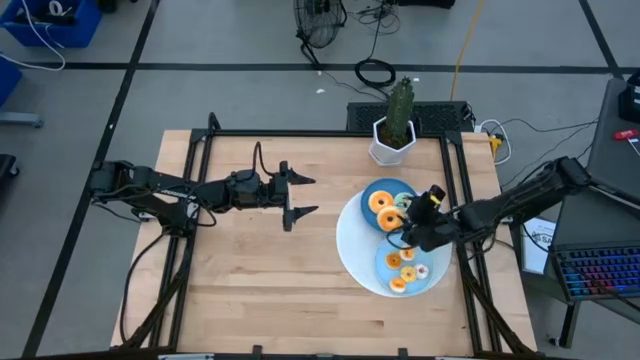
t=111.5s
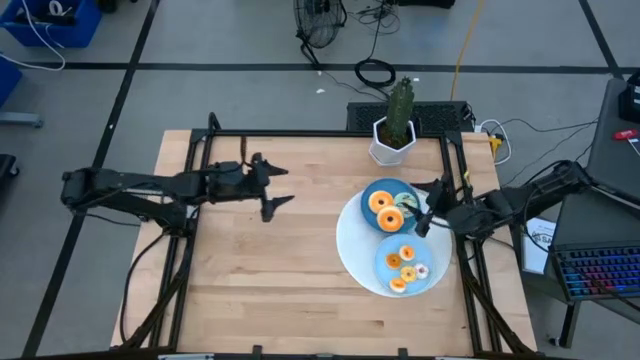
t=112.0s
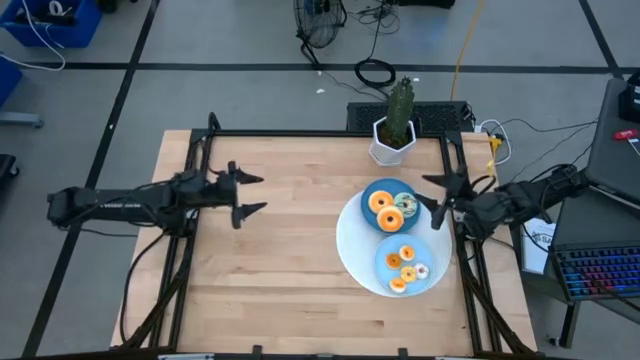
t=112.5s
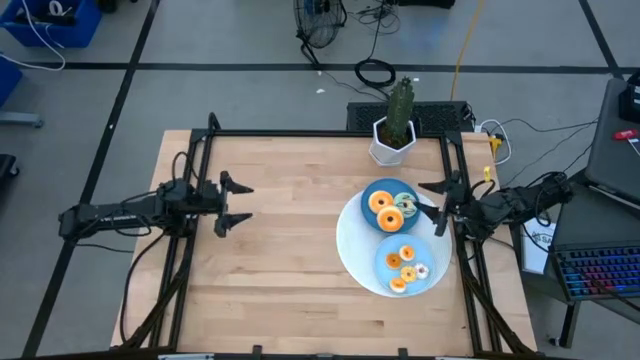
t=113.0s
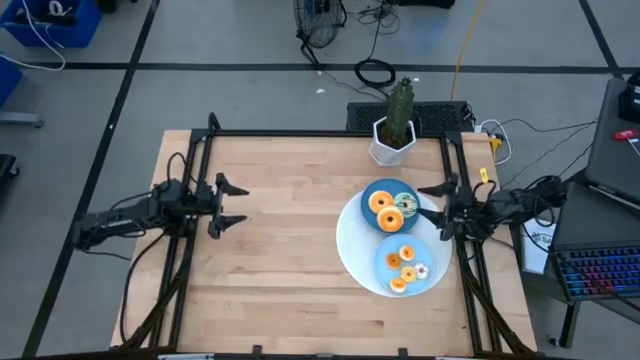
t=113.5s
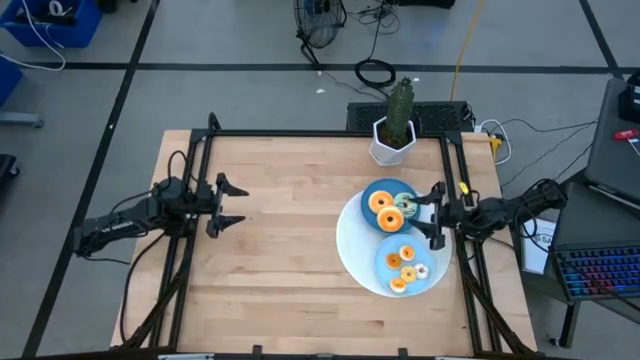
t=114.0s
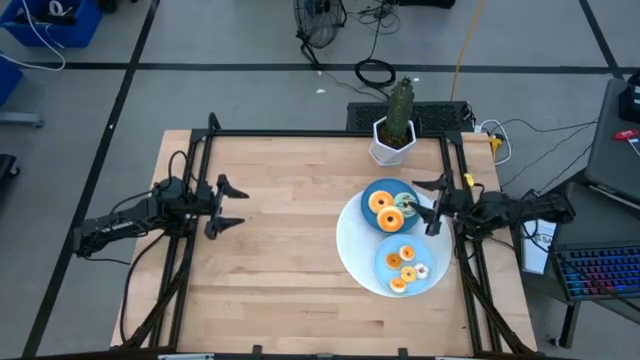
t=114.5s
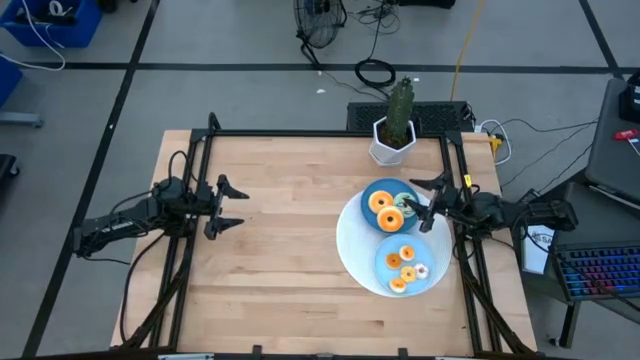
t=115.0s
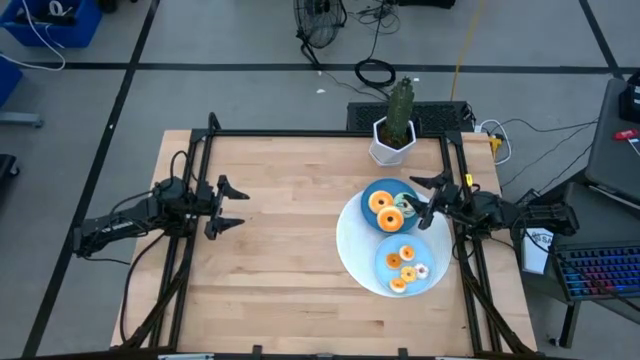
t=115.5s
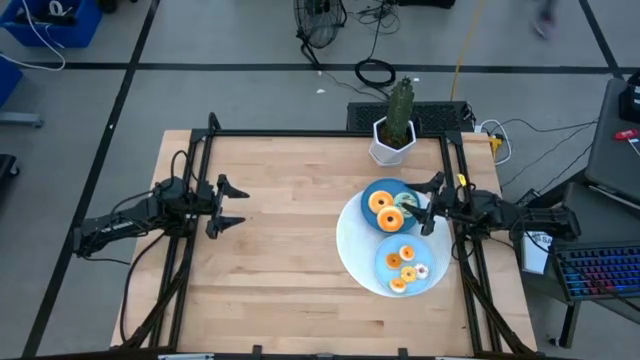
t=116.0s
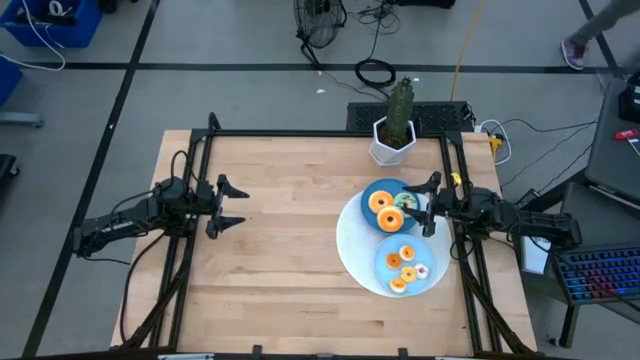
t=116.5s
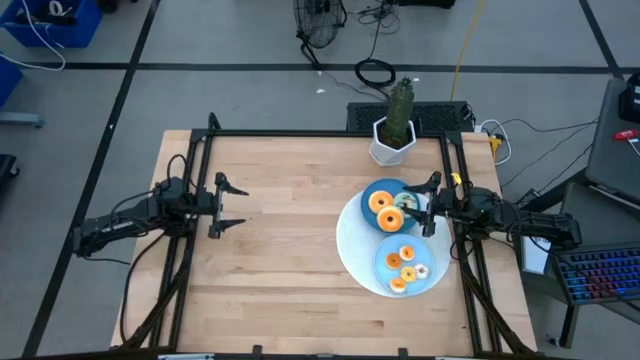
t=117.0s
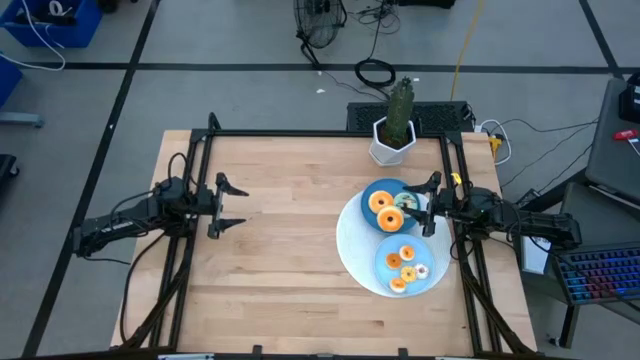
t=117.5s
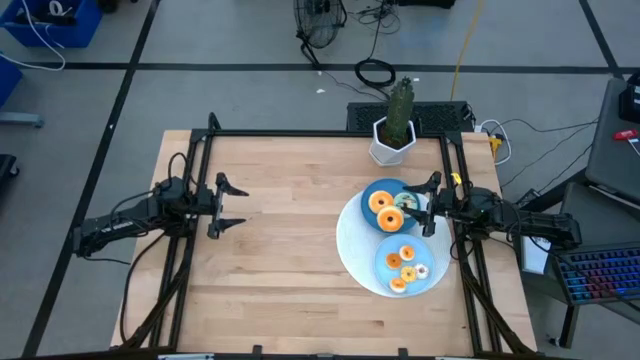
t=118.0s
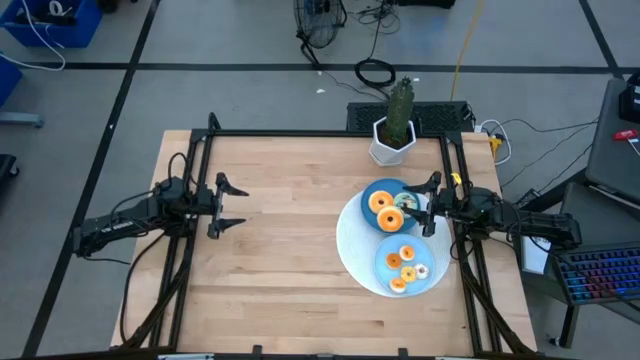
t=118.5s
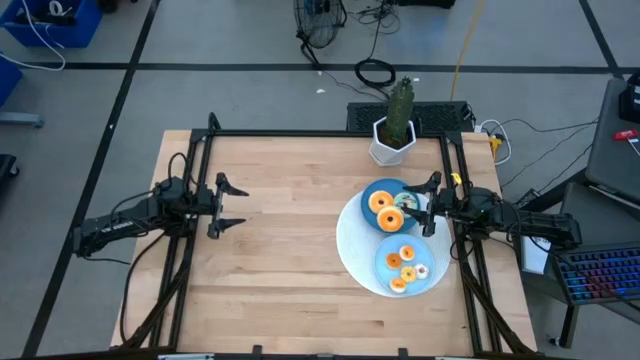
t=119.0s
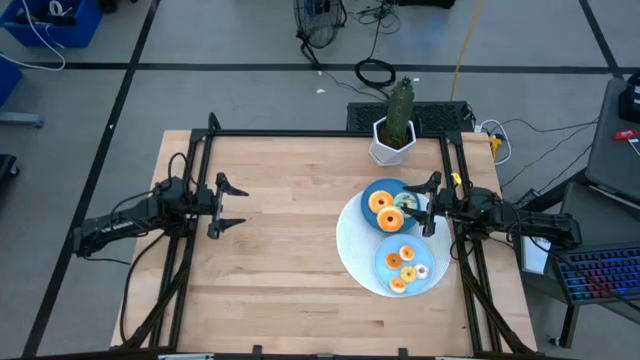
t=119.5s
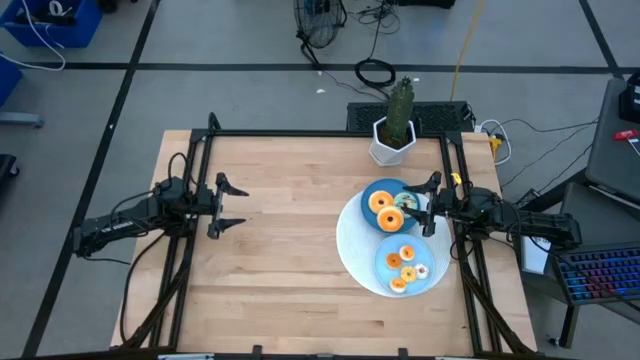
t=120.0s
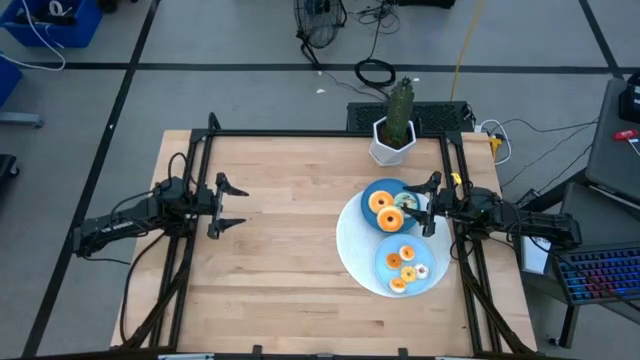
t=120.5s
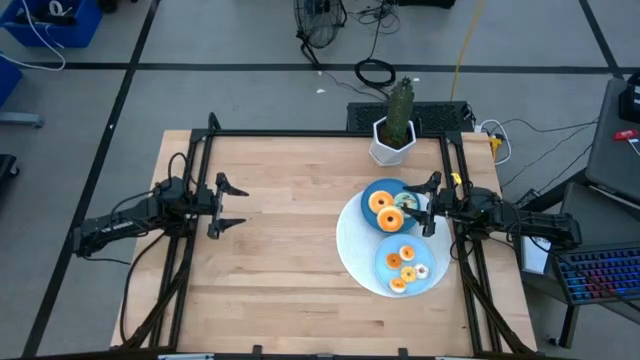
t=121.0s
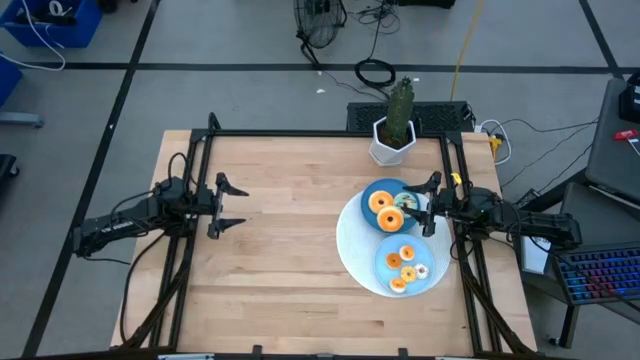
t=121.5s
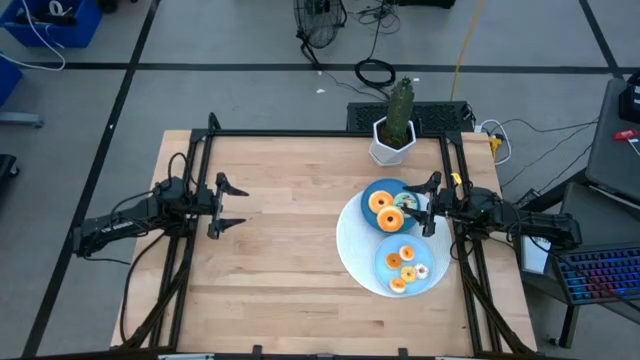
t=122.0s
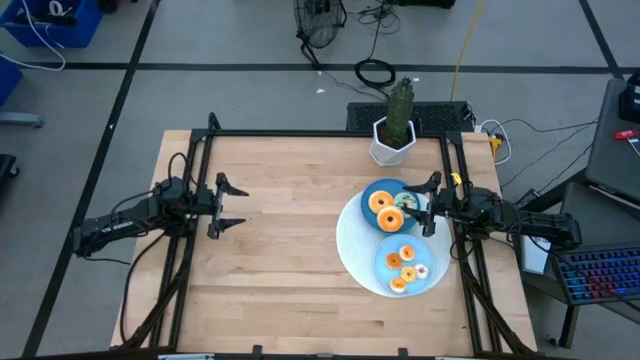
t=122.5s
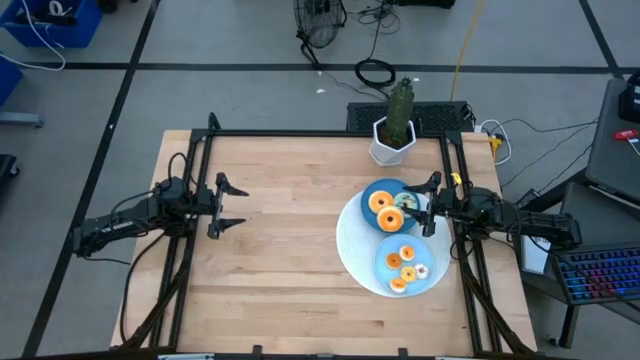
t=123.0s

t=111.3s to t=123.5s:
Task: Pick & Place donuts
Return to Home Position

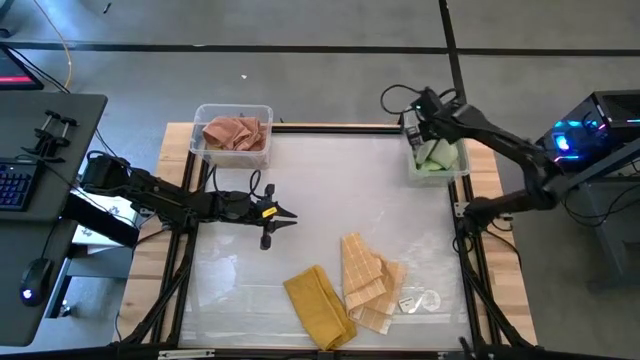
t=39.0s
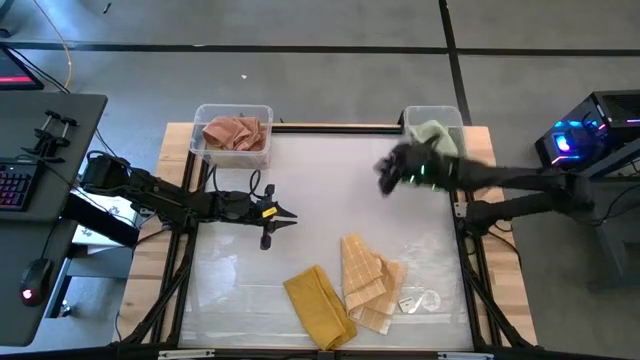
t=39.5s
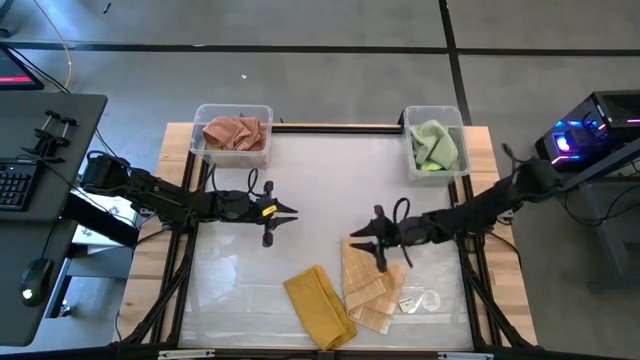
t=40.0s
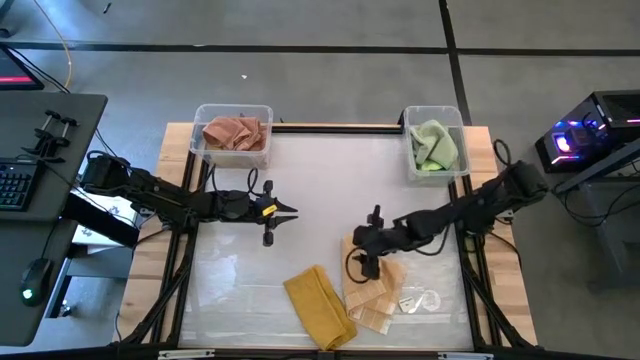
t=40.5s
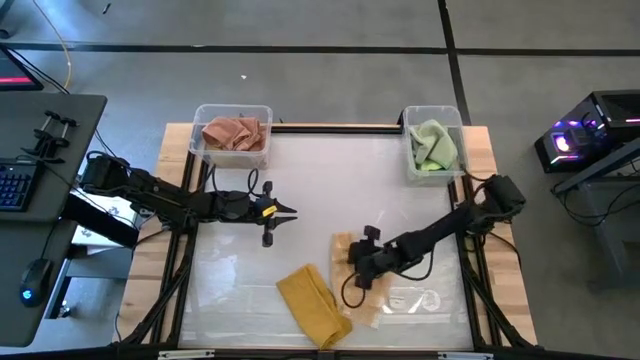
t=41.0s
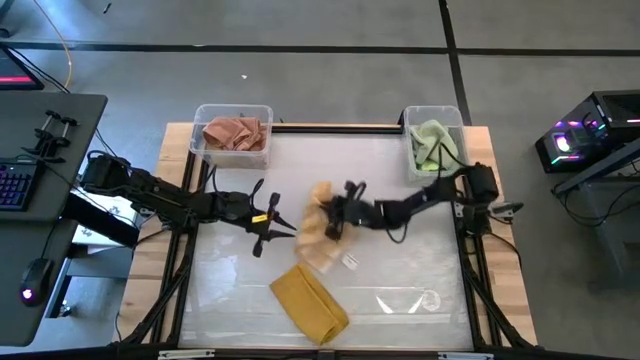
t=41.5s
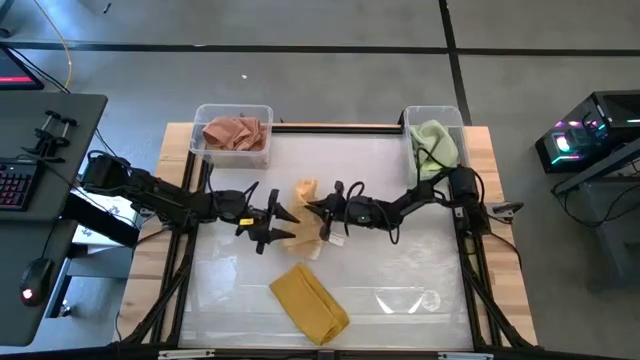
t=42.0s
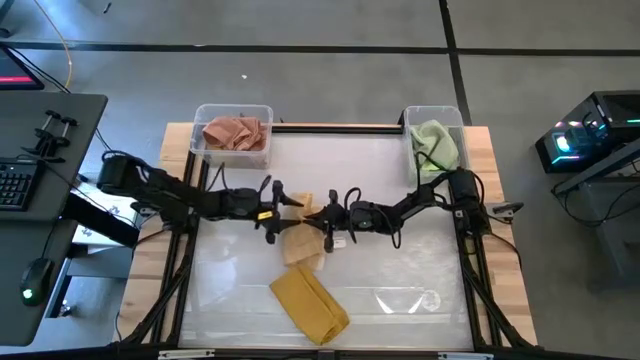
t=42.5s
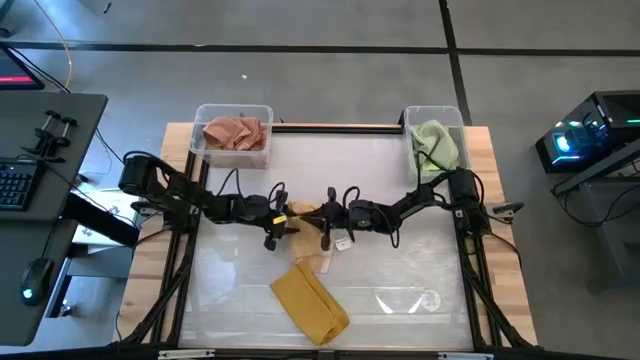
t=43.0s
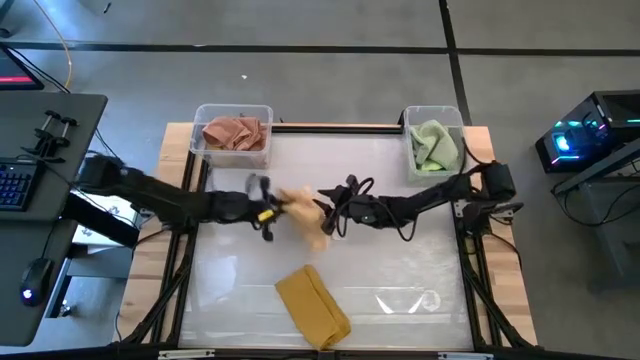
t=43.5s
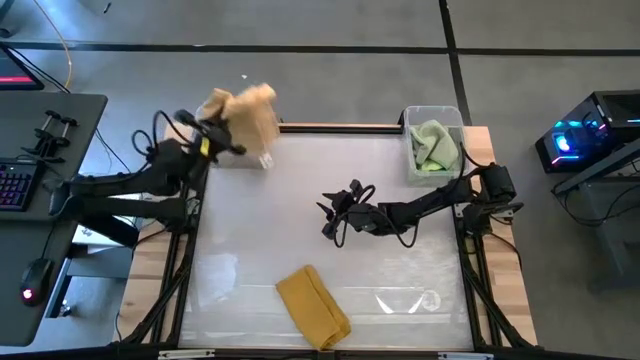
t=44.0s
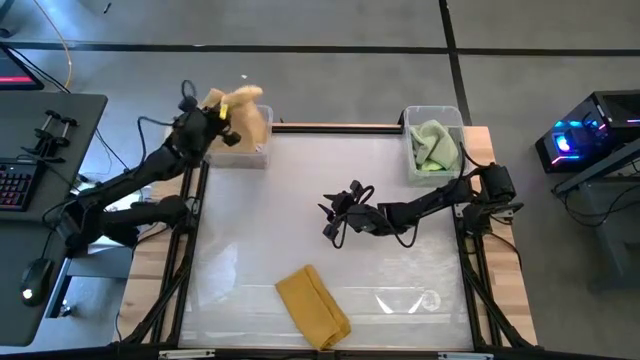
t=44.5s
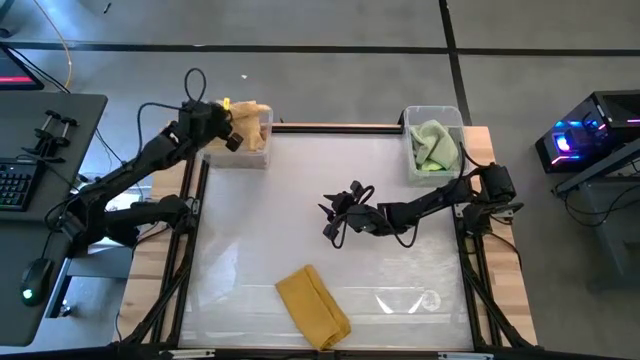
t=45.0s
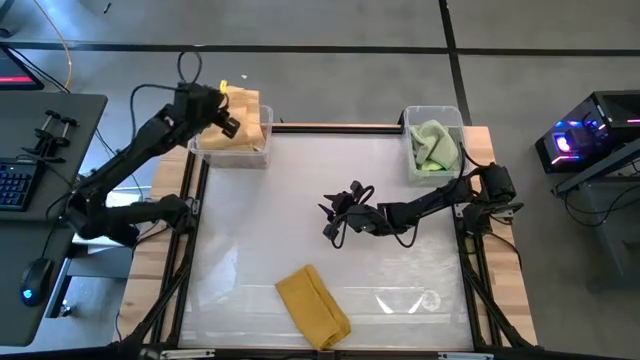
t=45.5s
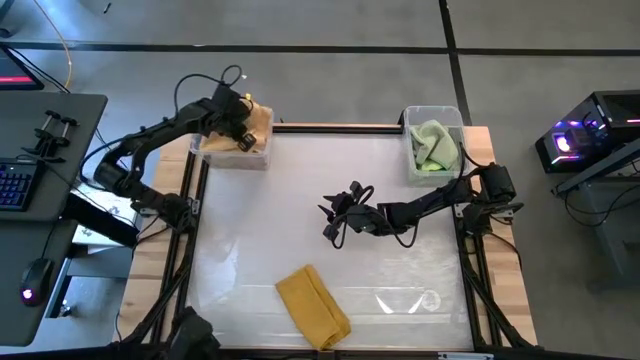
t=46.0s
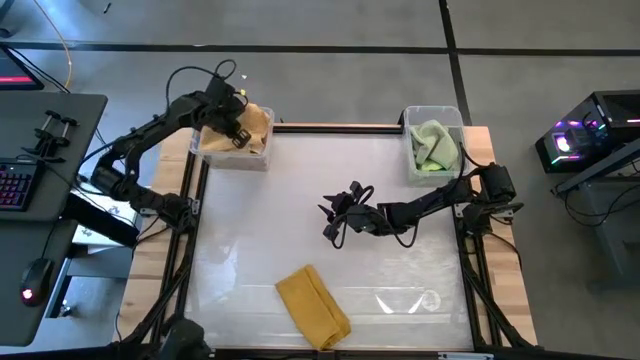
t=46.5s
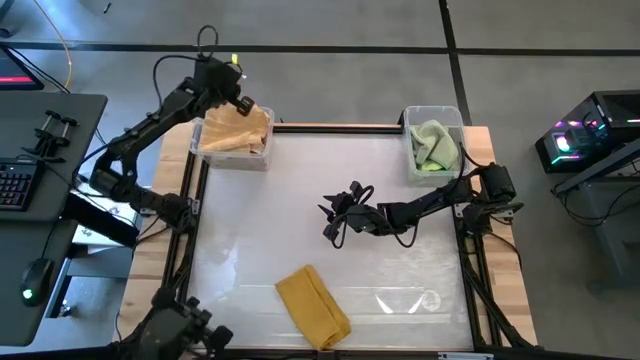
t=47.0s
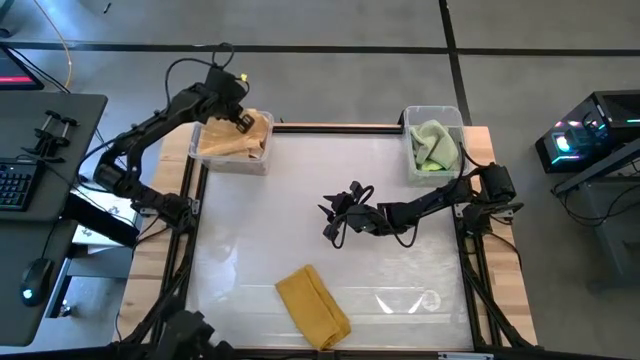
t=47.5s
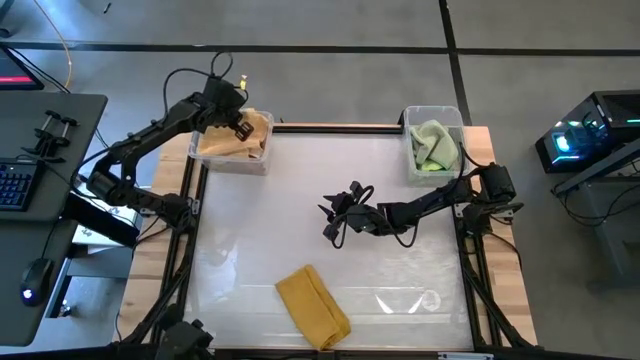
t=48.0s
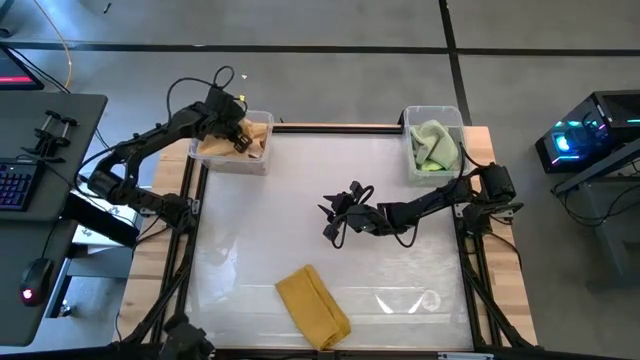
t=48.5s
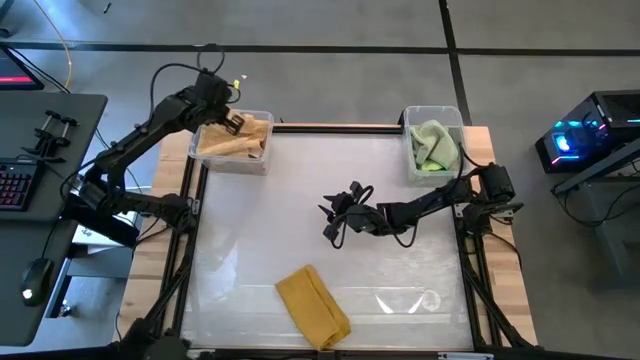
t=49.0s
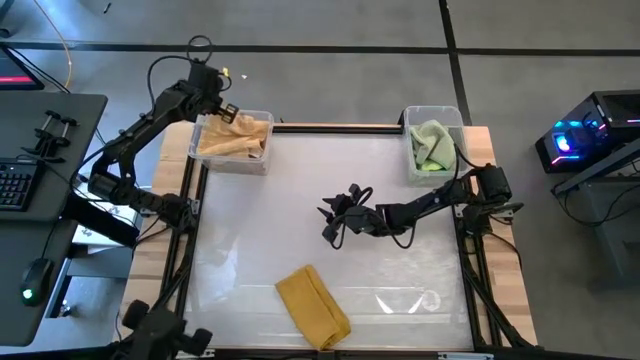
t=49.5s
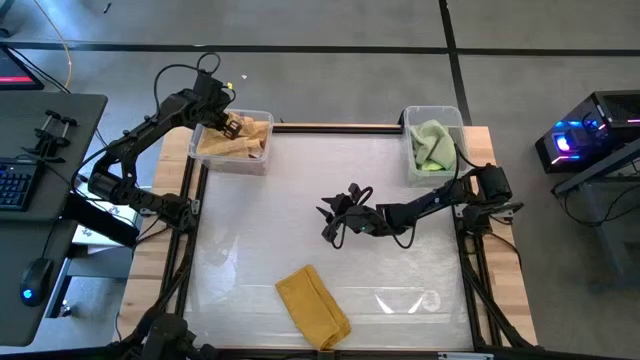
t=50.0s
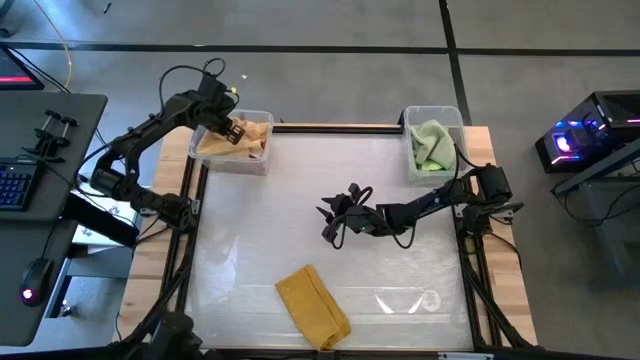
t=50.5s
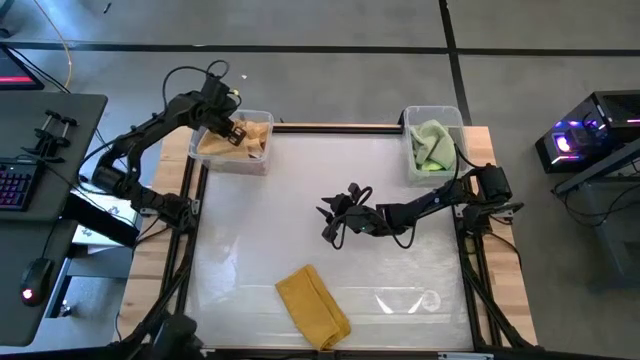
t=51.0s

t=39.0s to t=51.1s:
Task: Sort towels by color in basket
Put the light yellow microfiber cloth into the left transparent bin
